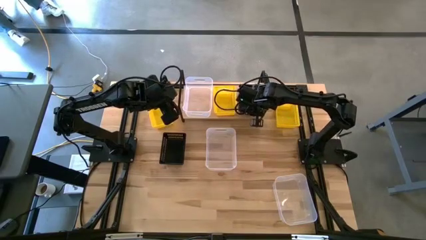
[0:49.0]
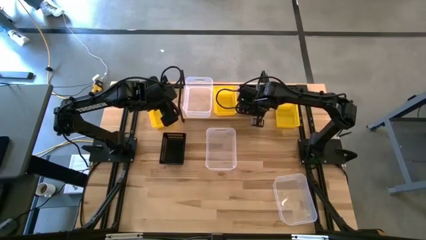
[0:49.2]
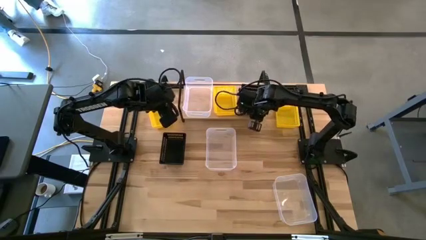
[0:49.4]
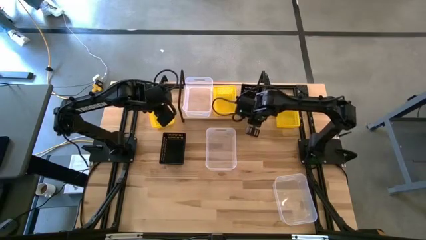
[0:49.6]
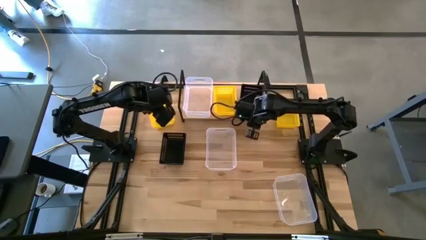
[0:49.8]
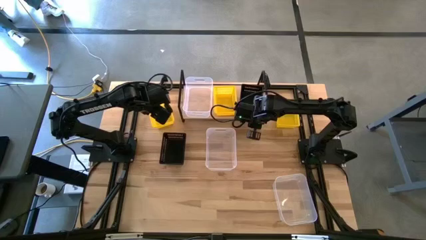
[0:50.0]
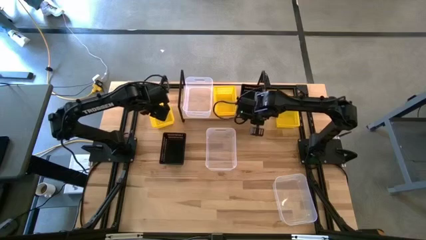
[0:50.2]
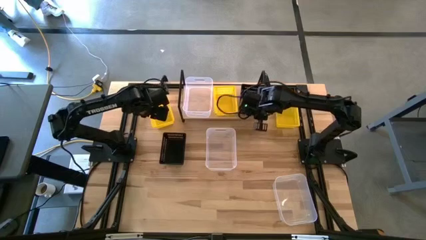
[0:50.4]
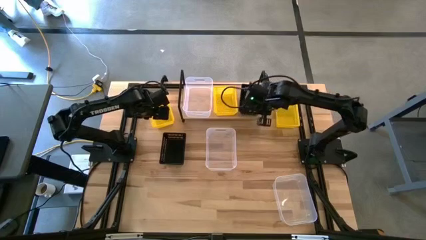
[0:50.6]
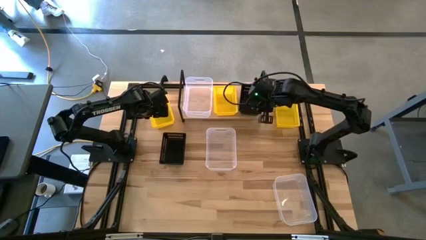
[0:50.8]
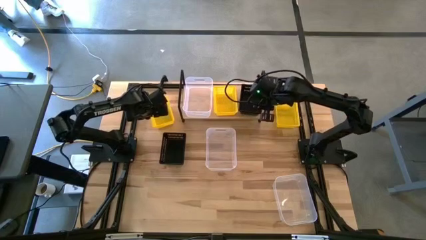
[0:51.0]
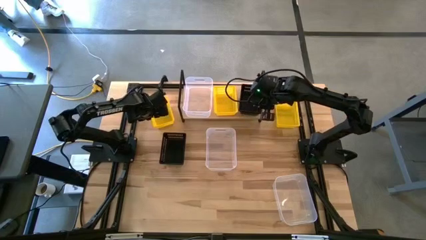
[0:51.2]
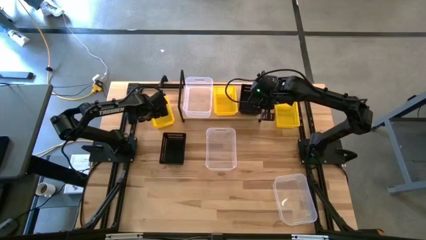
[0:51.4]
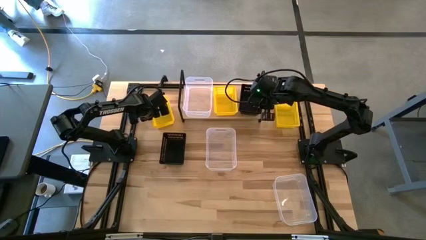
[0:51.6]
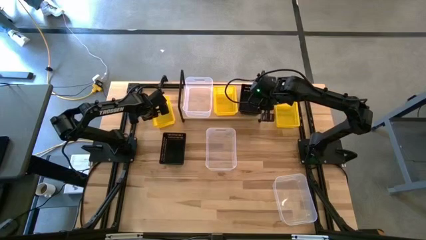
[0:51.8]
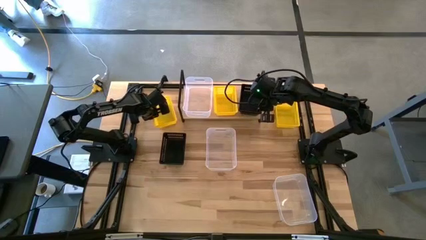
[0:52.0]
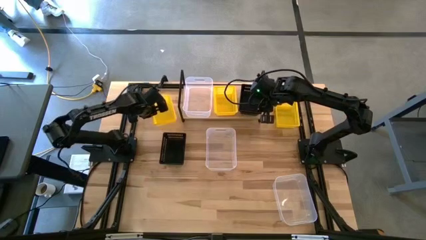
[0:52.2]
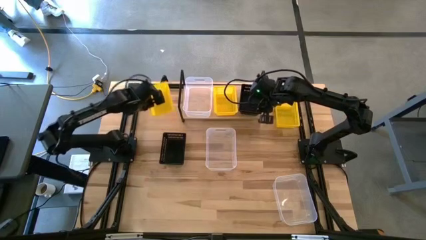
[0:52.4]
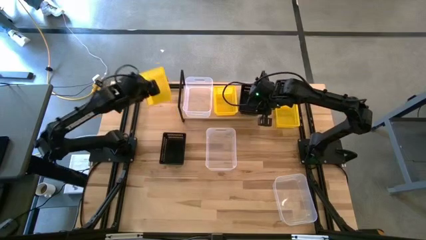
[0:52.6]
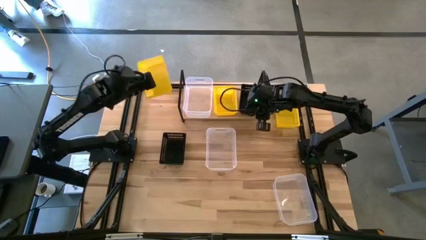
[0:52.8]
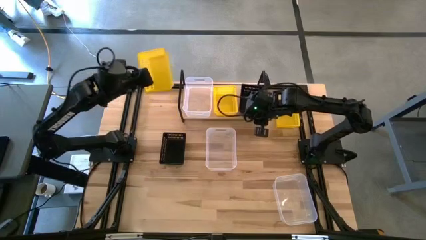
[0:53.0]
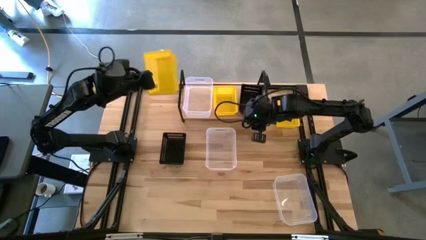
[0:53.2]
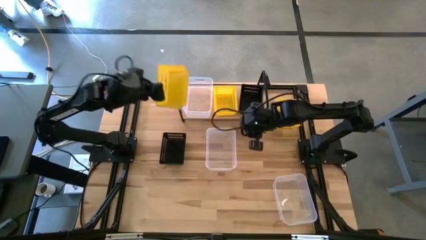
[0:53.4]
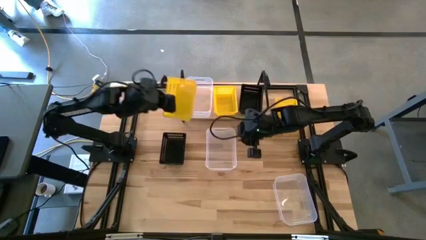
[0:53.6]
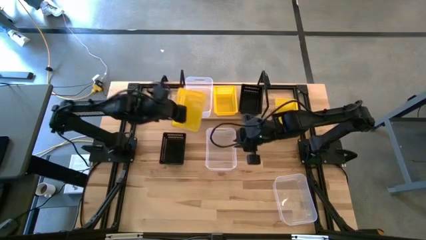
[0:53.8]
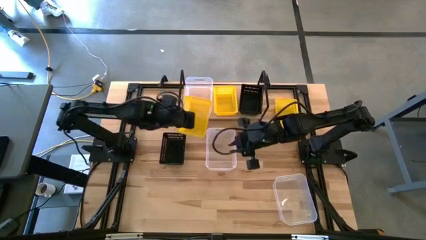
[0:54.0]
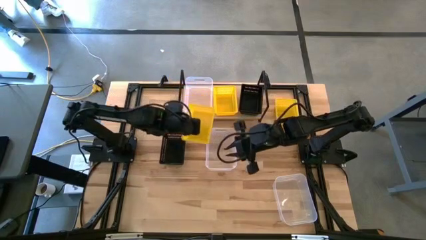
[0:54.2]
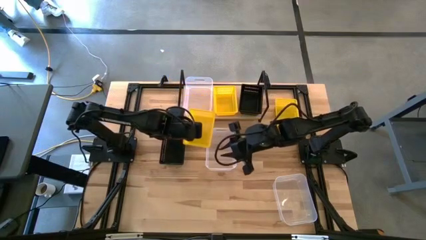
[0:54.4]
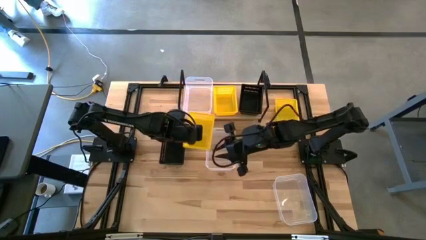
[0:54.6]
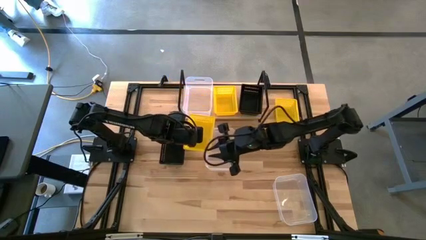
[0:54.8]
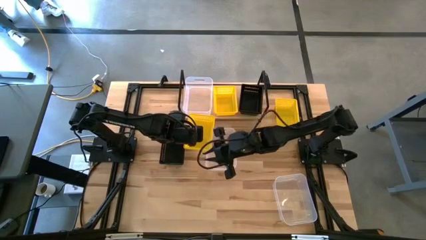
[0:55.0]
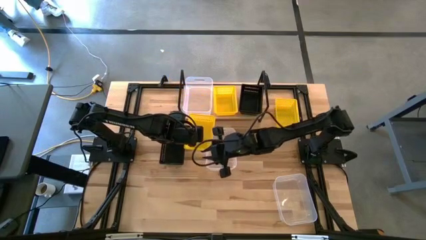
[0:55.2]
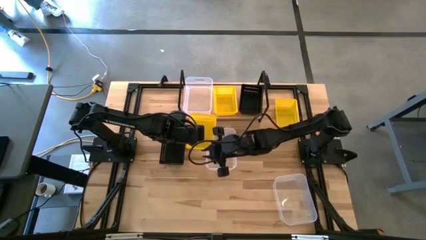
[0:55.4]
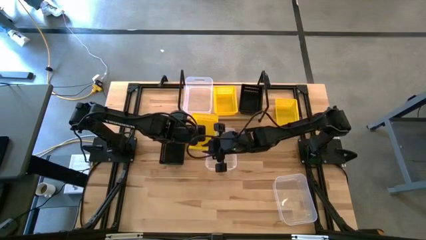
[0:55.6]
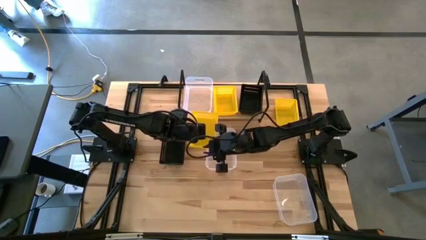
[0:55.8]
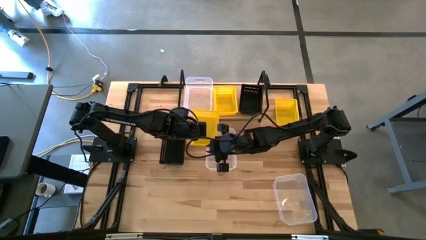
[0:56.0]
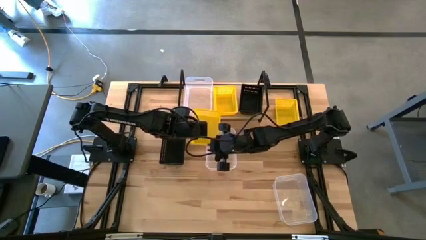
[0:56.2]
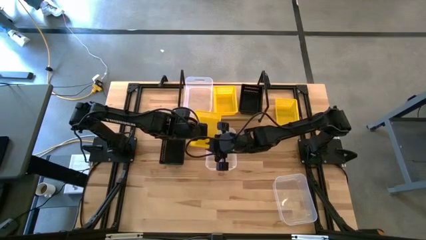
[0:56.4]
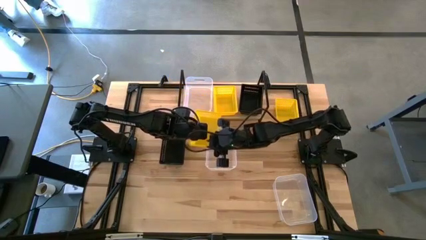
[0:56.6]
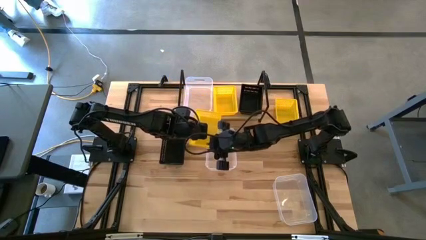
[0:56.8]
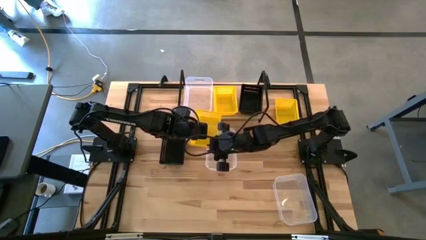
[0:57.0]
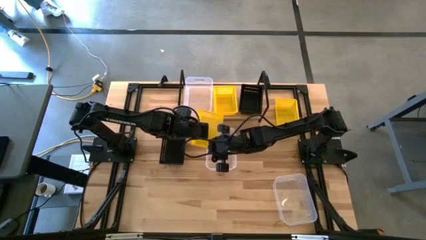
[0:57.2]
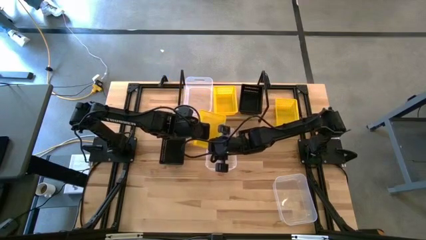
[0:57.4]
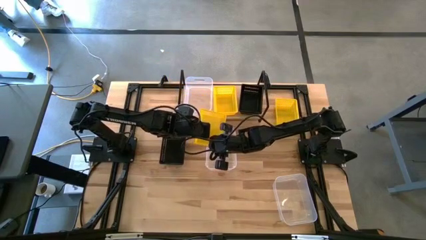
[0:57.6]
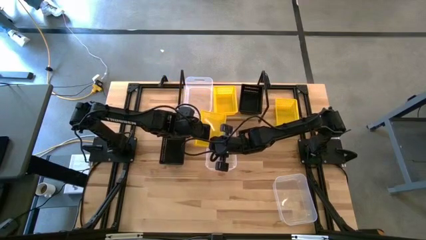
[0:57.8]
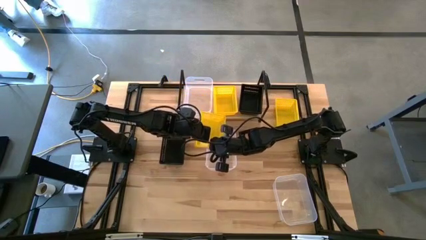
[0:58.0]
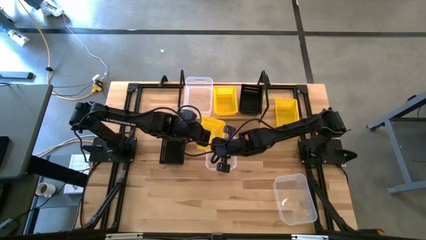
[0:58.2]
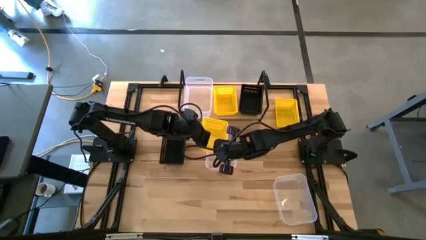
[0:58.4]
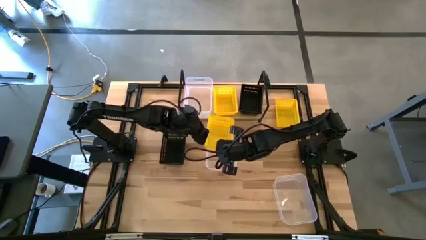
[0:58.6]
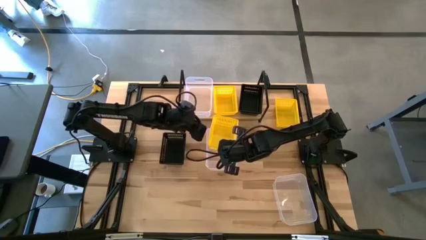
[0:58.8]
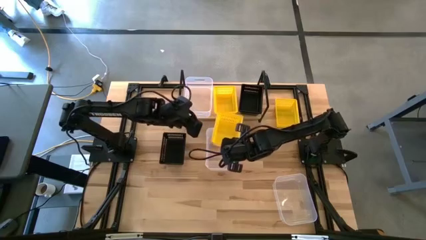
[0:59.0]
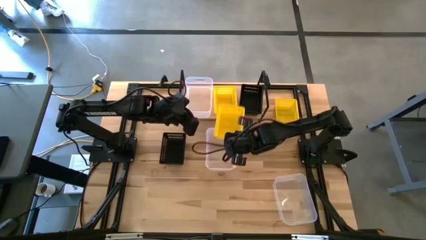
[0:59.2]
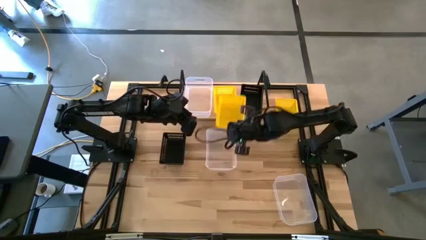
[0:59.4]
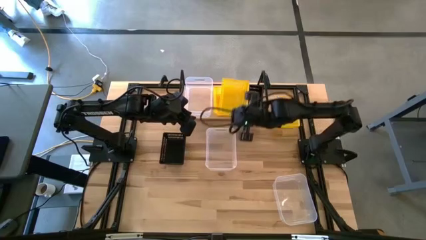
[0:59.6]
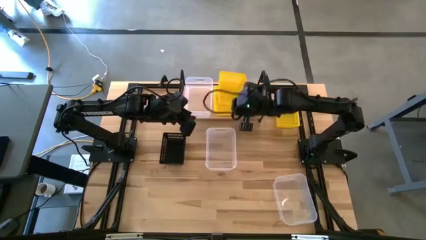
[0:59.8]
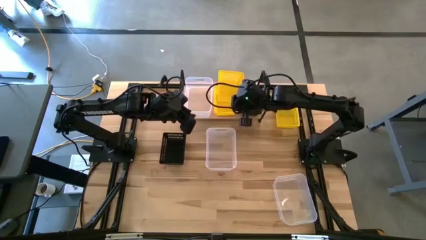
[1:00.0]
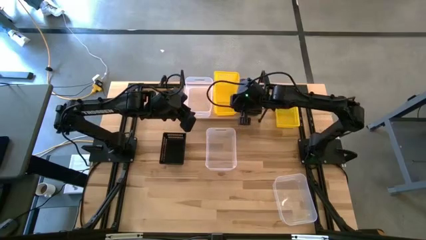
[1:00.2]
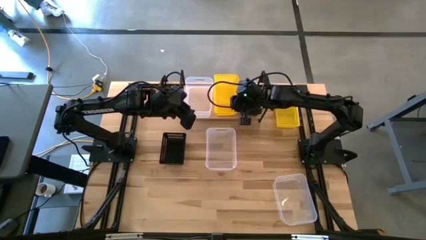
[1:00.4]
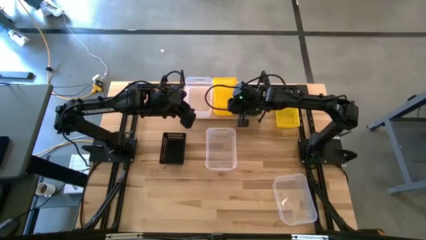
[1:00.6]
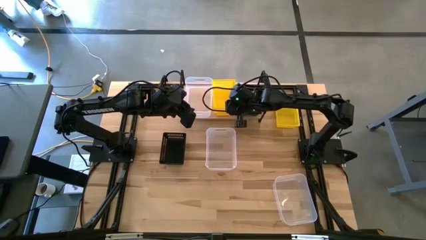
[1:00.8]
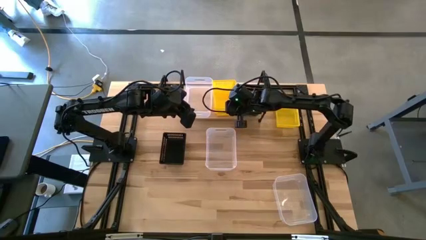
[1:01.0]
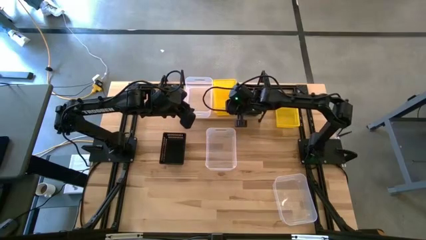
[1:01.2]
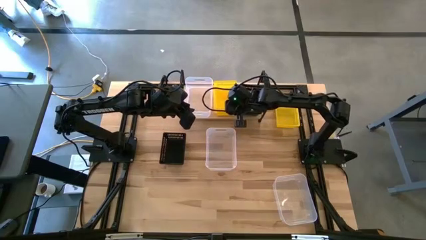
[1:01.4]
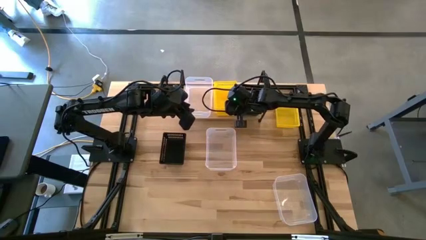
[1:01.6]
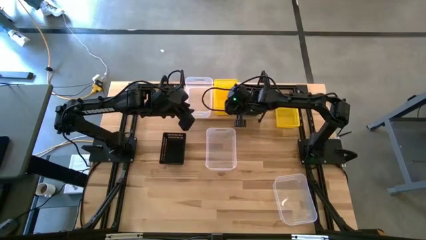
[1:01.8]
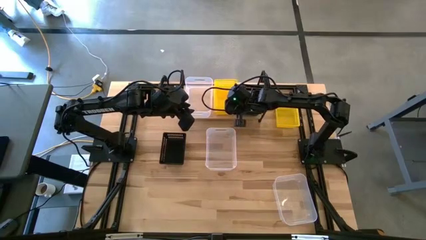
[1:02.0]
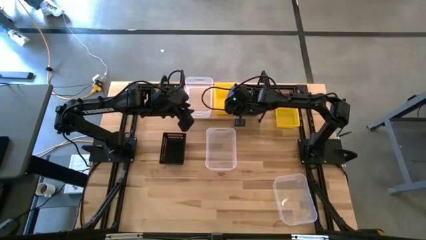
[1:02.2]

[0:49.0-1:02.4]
Task: Stack baskets on shelf by color
Stack the left yellow bin on the yellow bin on the shelf
